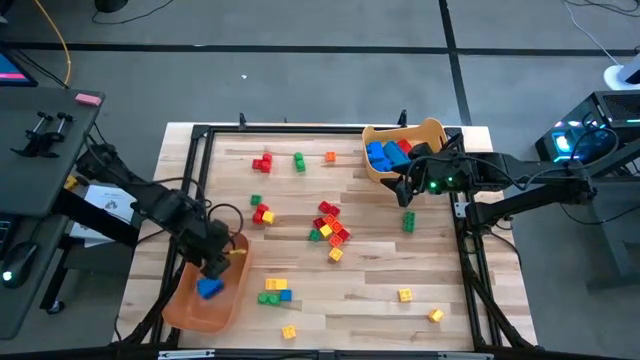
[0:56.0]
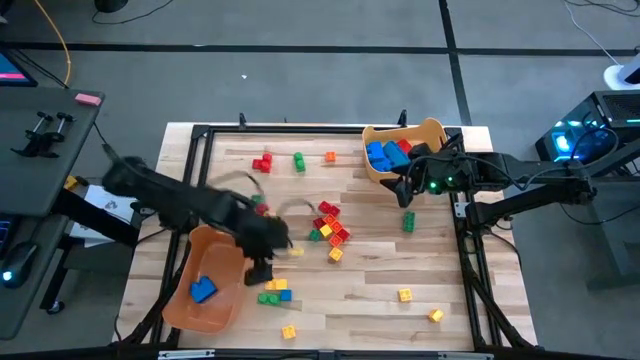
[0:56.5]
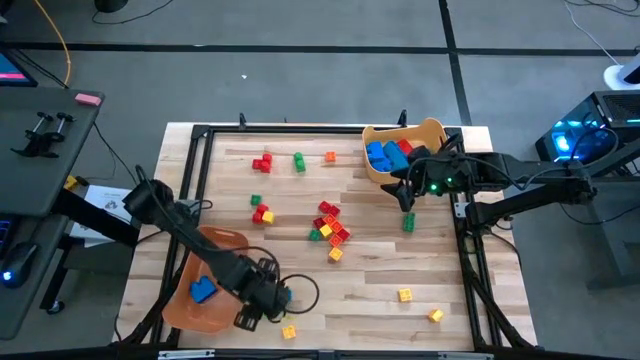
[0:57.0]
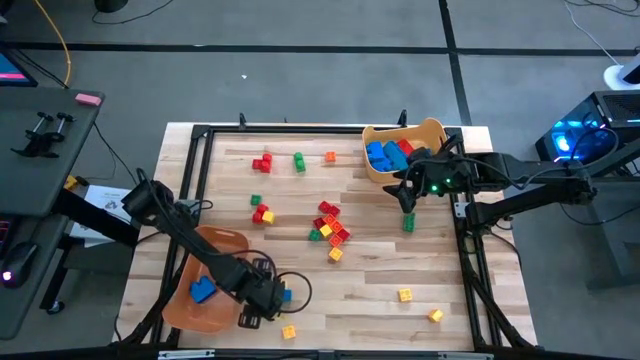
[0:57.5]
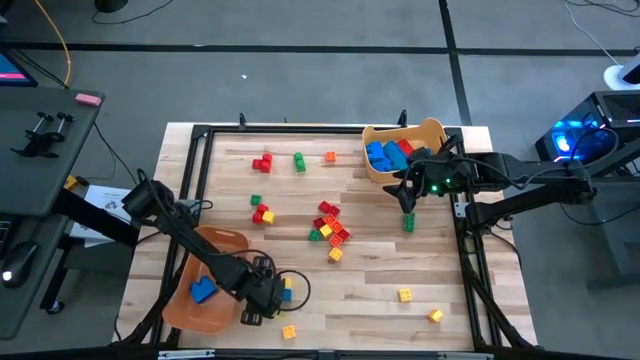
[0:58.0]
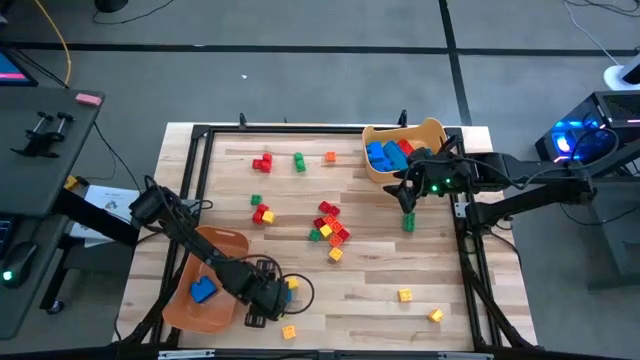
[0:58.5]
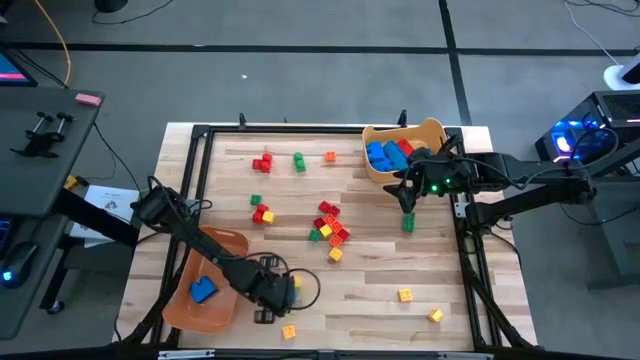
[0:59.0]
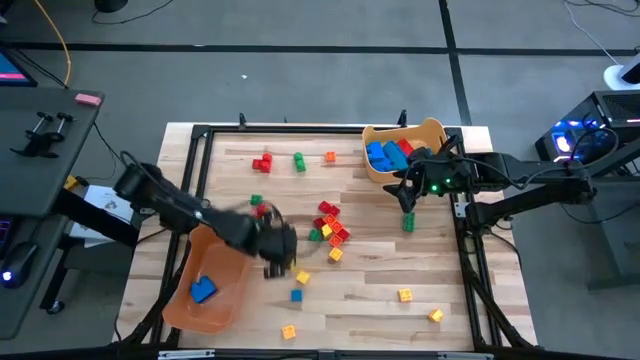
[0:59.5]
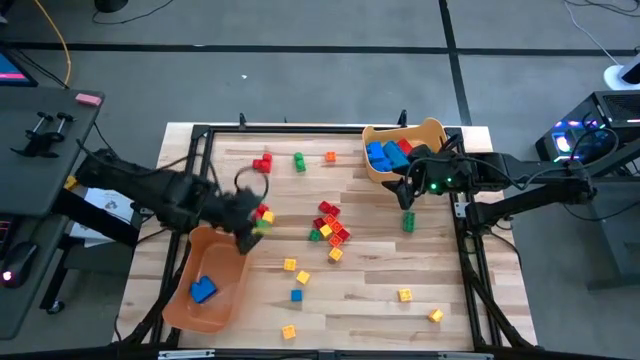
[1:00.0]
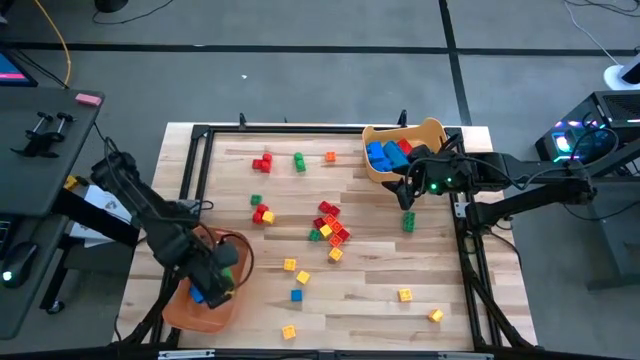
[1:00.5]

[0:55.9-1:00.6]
Task: Sort blocks by size
Put the green game piece into the orange bin

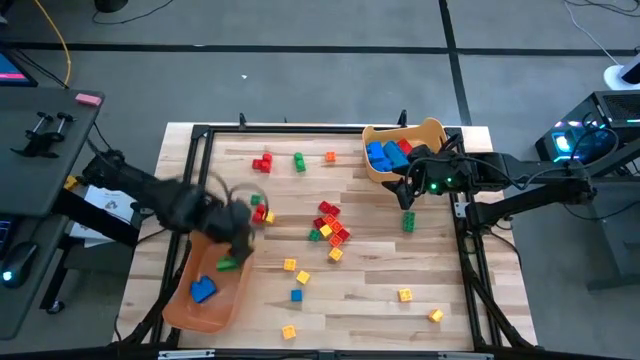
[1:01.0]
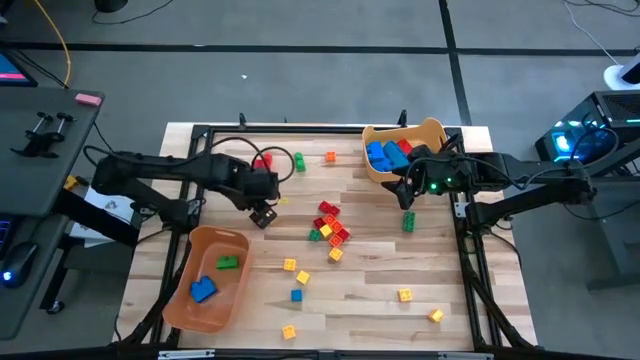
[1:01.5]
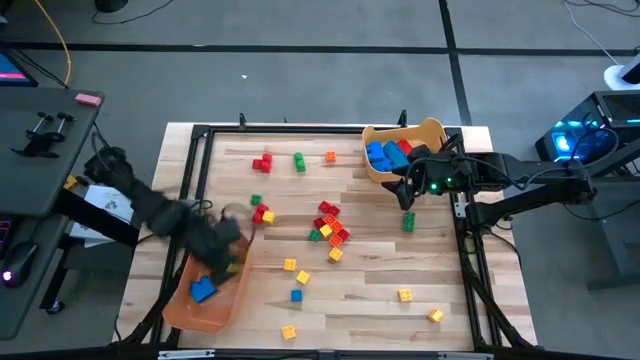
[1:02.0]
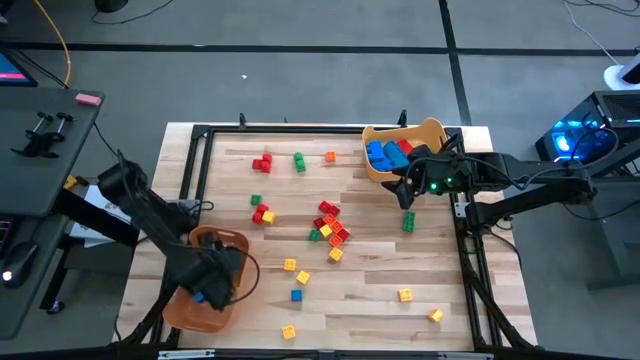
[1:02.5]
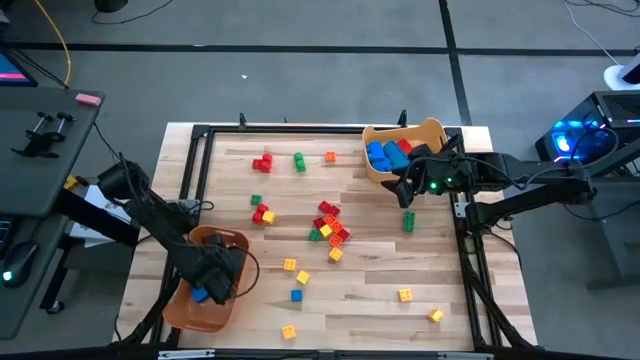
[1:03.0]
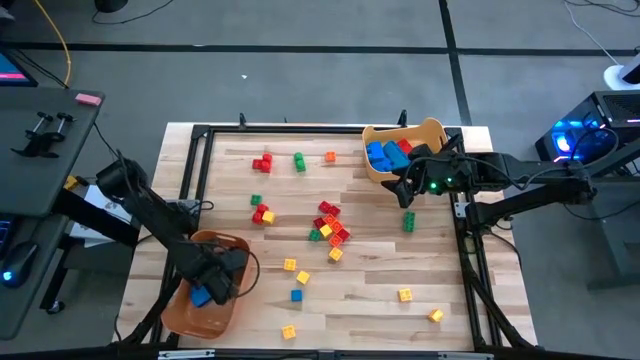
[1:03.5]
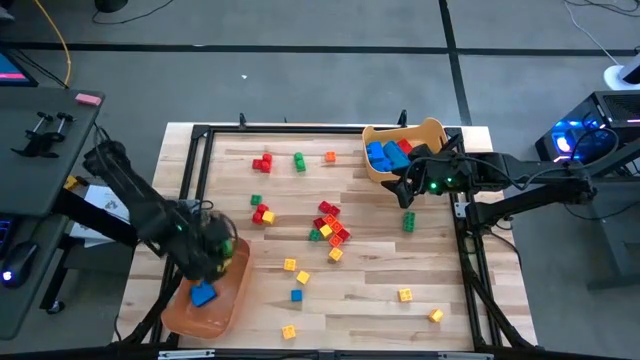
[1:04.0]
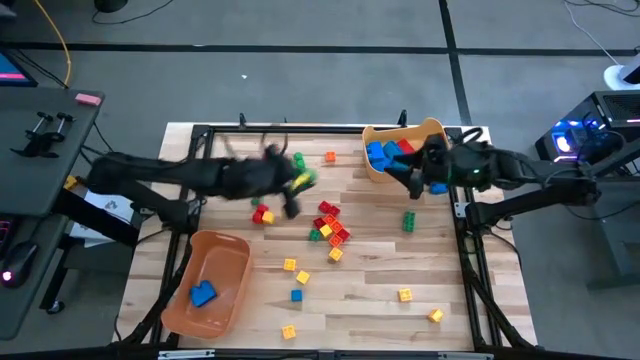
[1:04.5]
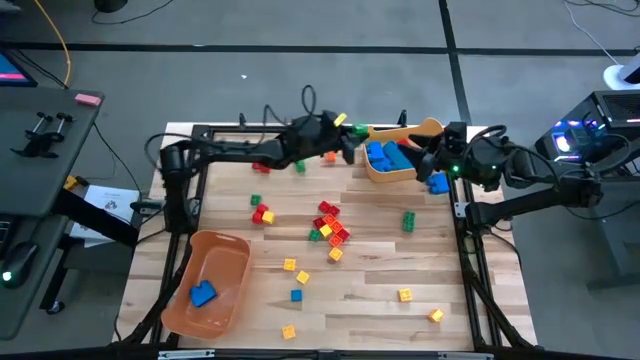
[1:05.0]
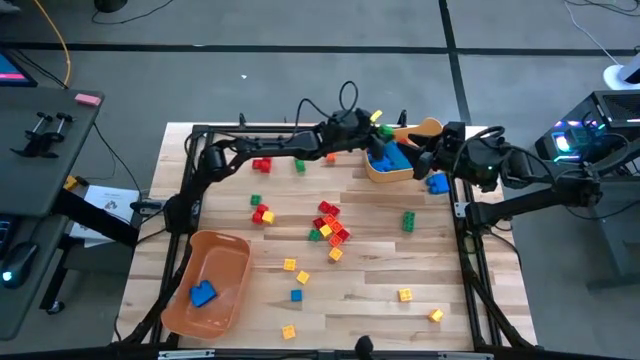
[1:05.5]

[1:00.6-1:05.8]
Remove the green game piece from the orange bin and put it into the yellow bin

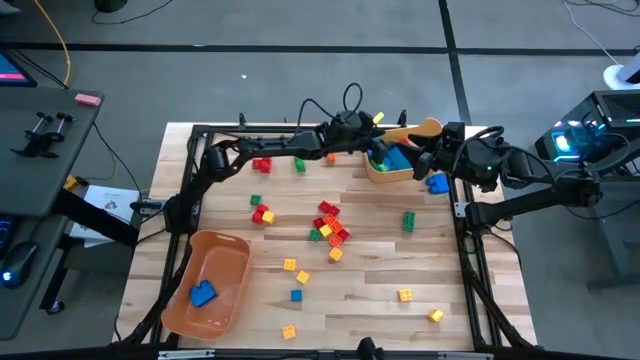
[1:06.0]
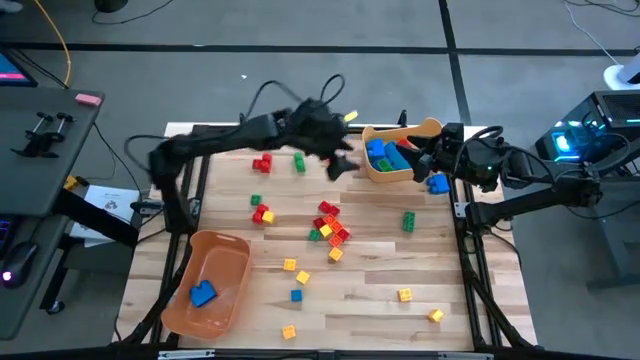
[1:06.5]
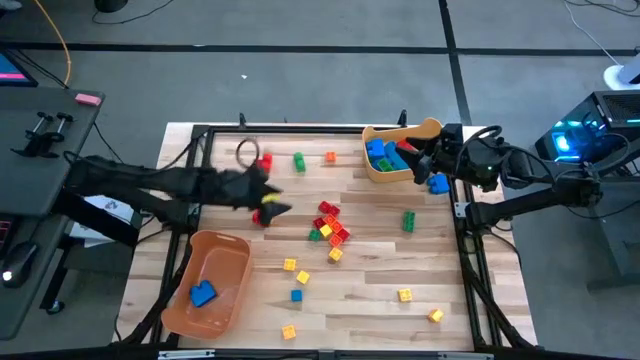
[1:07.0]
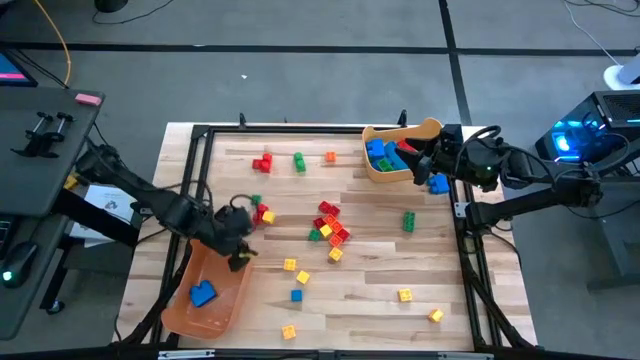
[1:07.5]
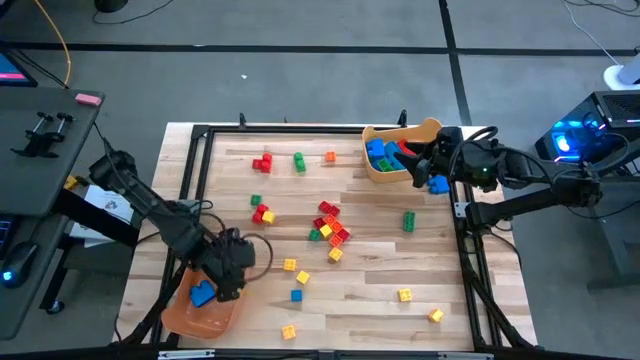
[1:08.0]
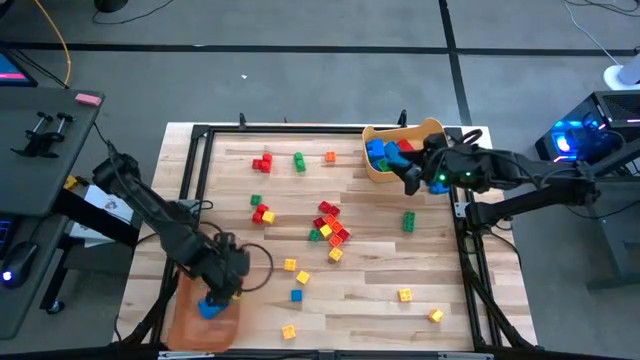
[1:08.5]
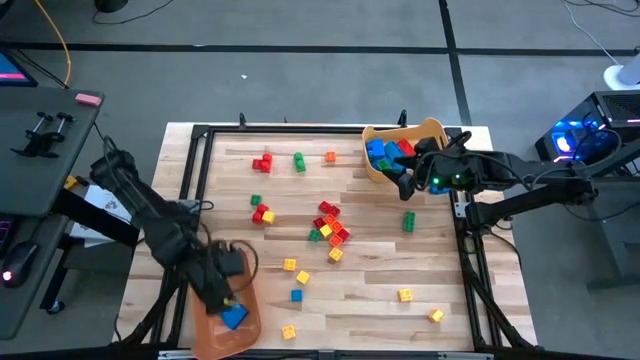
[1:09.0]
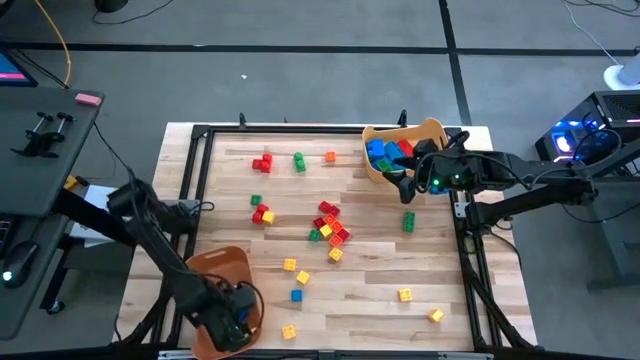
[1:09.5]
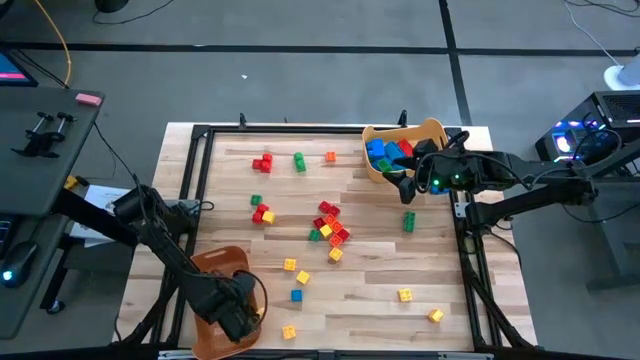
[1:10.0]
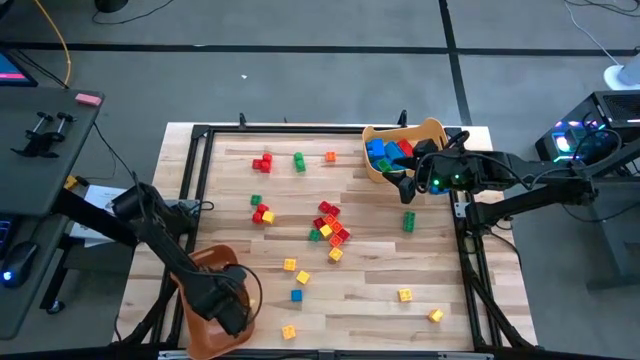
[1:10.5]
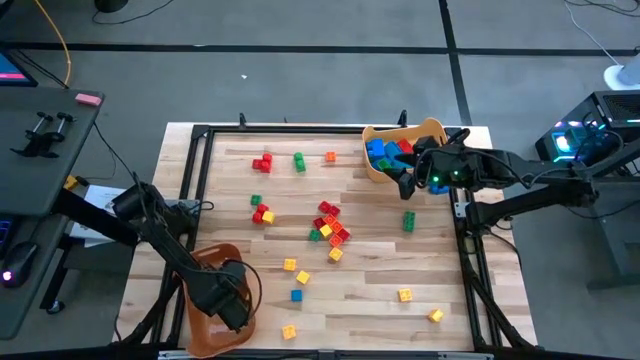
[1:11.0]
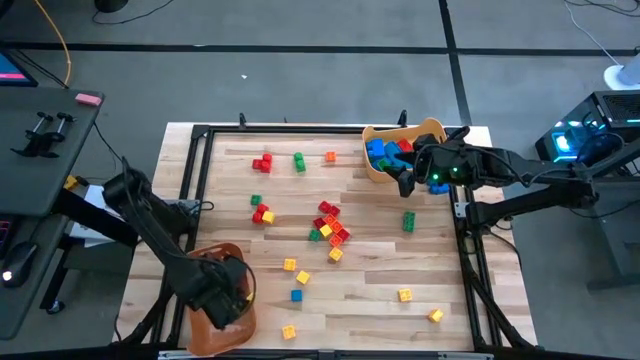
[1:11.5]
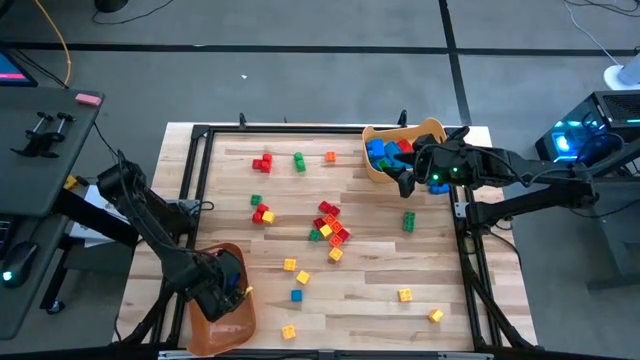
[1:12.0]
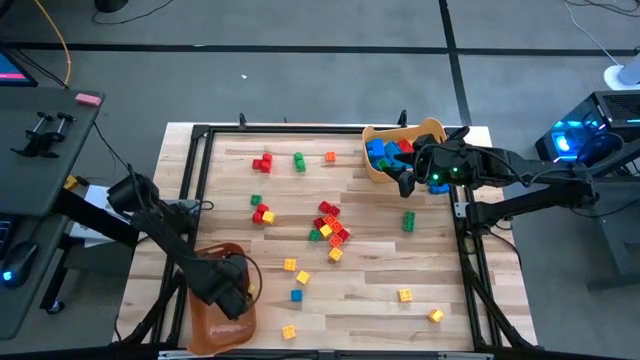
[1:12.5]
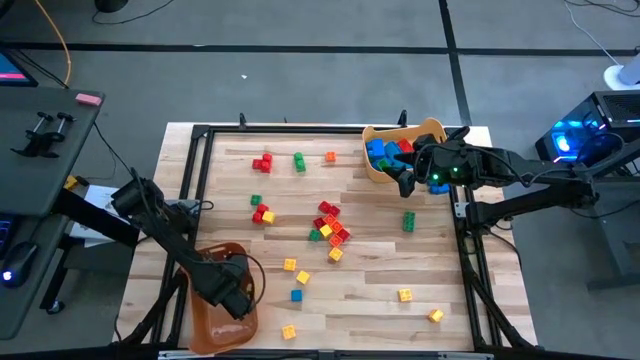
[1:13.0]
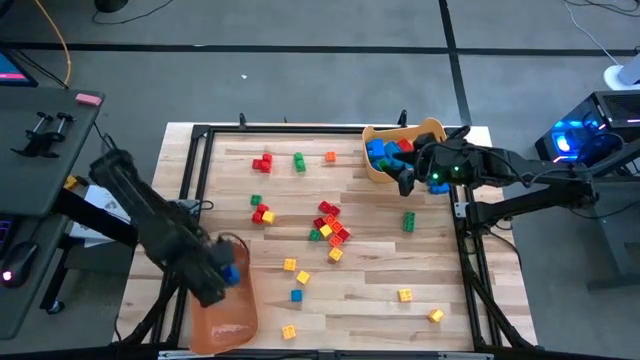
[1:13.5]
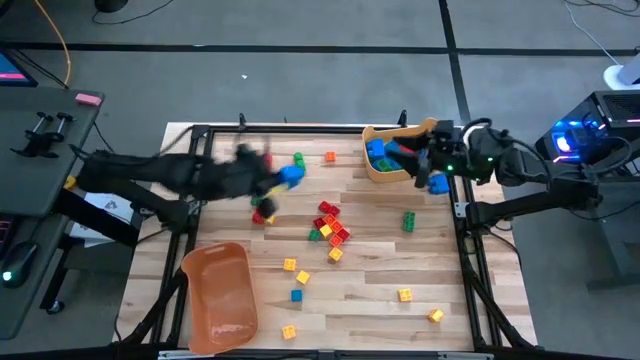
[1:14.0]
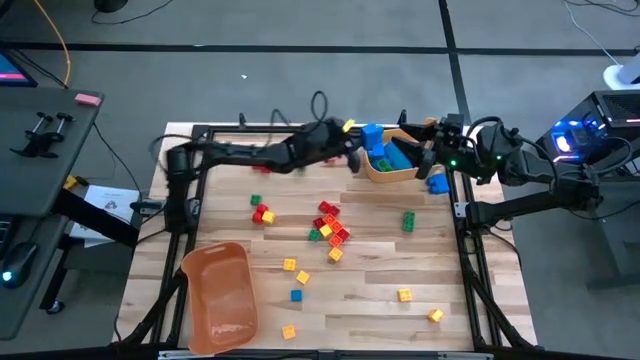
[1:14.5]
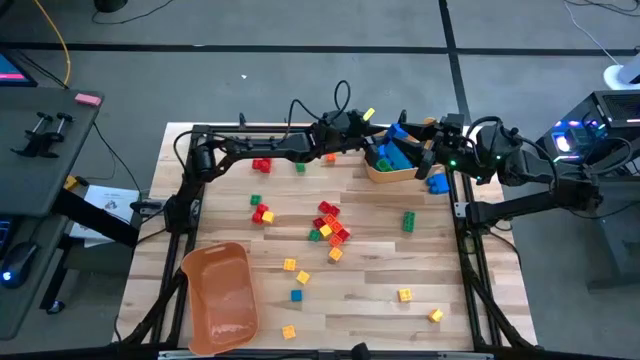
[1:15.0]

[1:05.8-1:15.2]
Remove the blue game piece from the orange bin and put it into the yellow bin

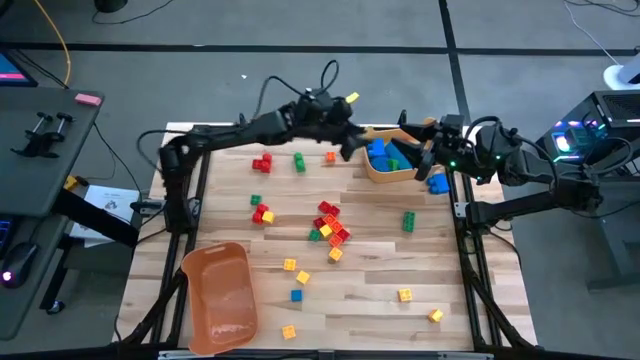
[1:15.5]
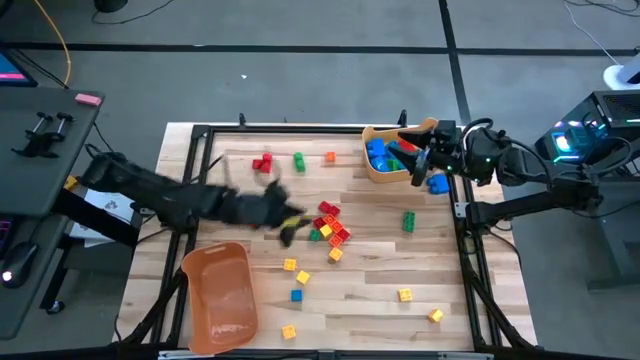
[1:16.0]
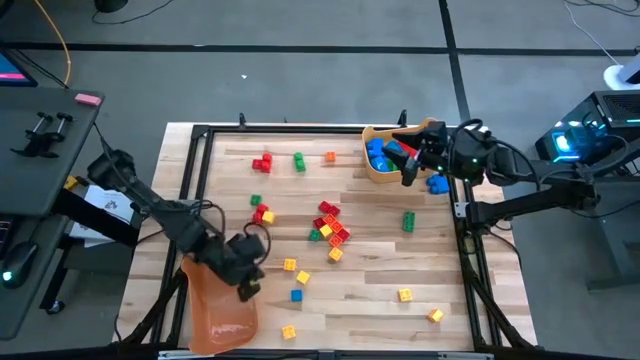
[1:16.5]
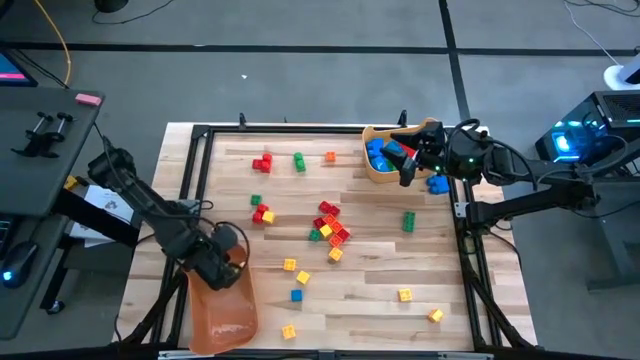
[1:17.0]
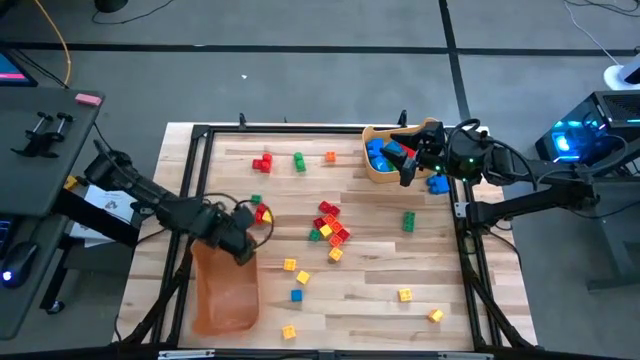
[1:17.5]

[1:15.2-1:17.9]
Adjust the orange bin
